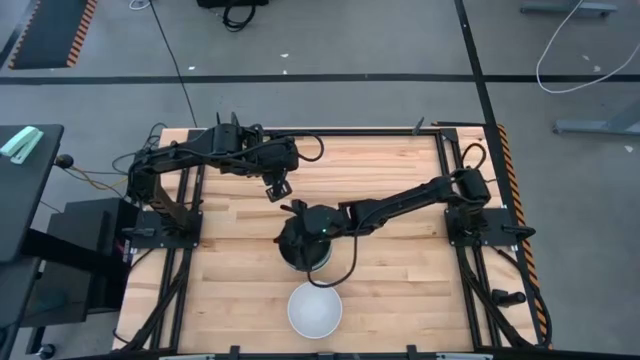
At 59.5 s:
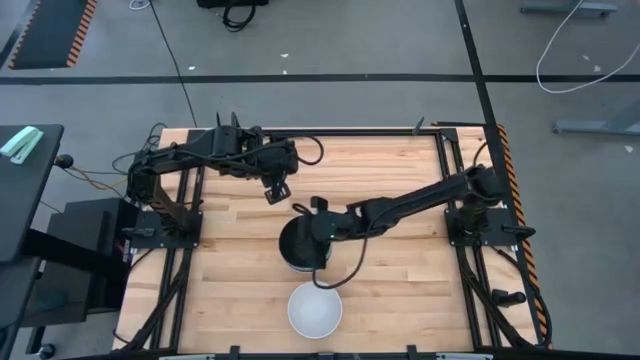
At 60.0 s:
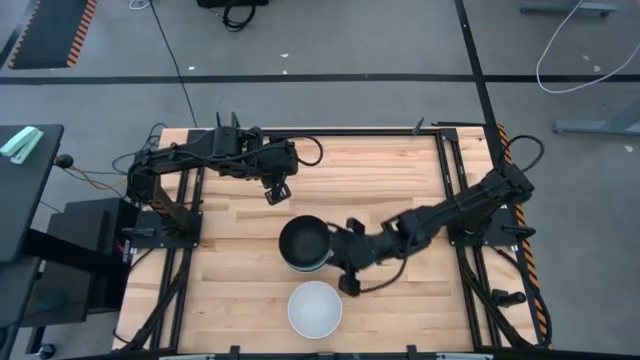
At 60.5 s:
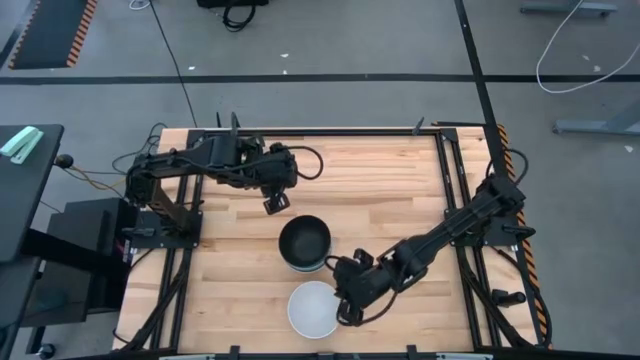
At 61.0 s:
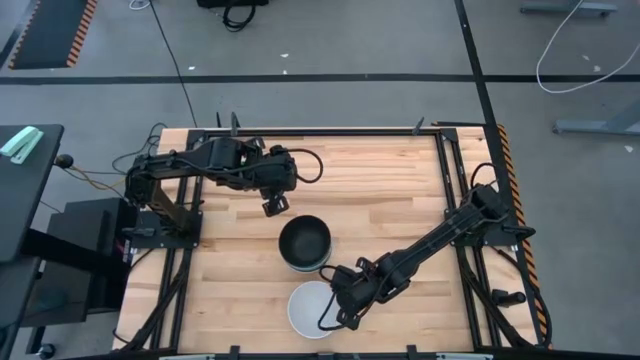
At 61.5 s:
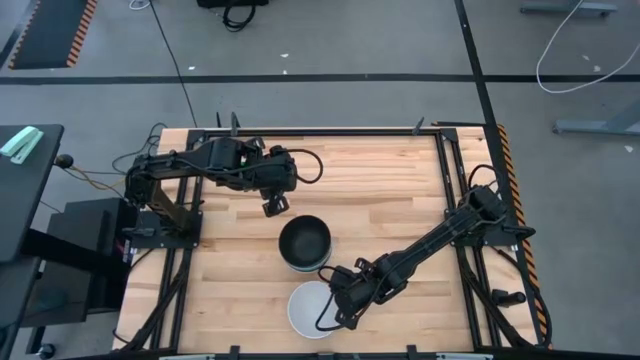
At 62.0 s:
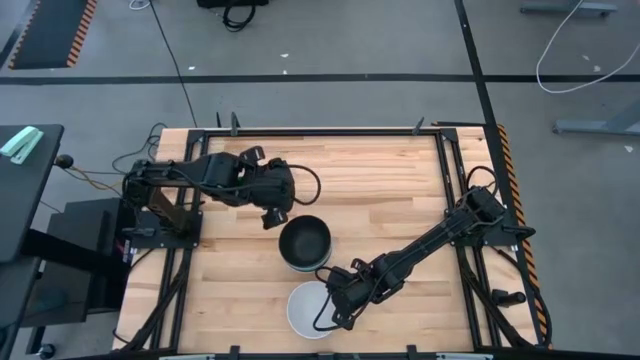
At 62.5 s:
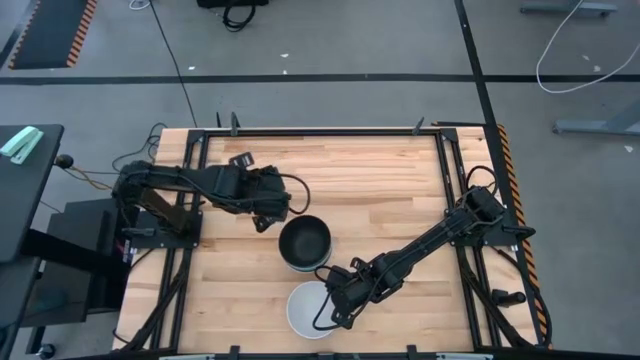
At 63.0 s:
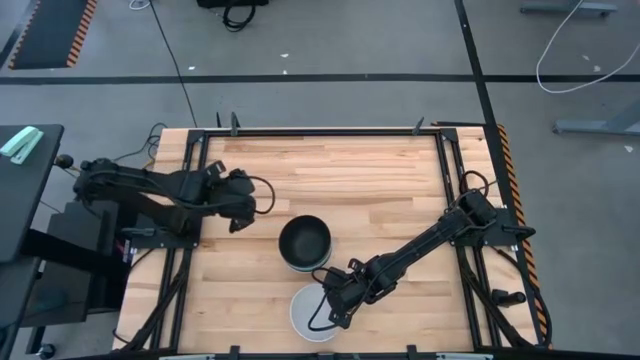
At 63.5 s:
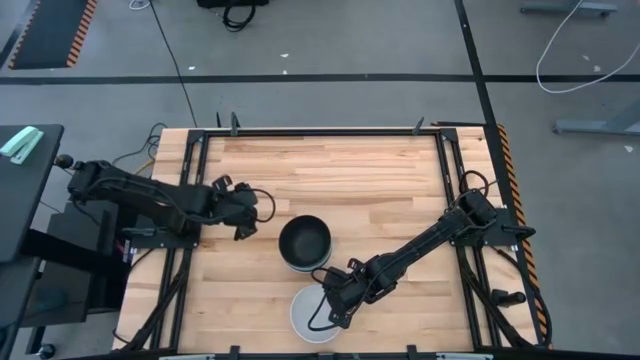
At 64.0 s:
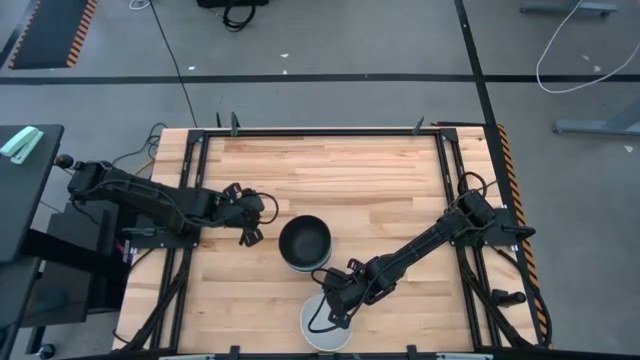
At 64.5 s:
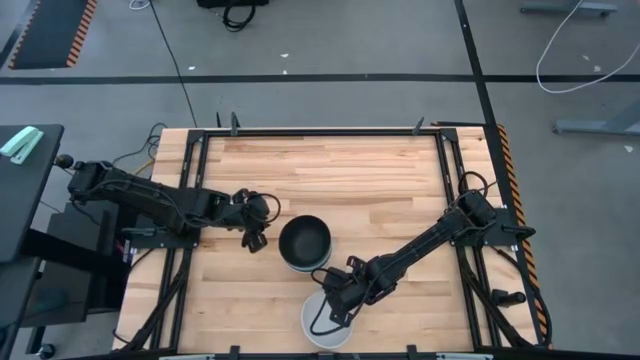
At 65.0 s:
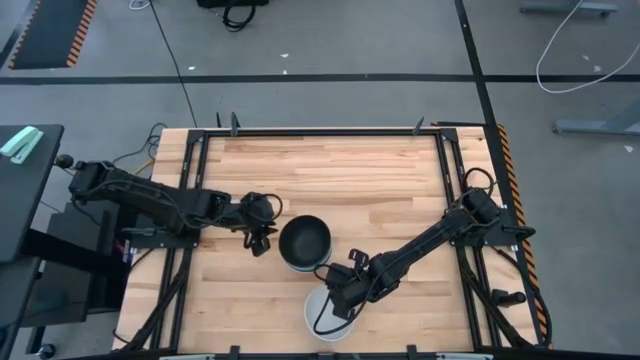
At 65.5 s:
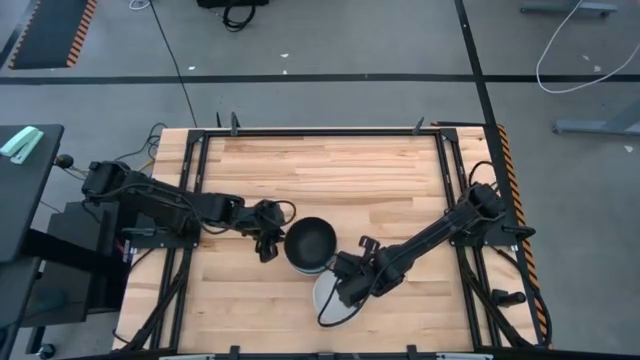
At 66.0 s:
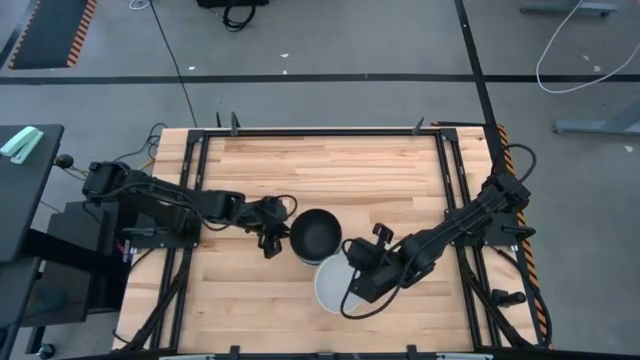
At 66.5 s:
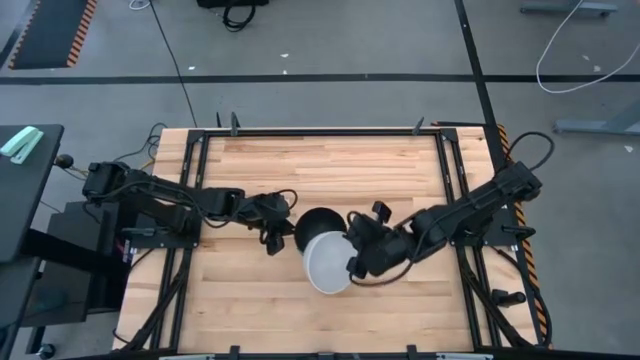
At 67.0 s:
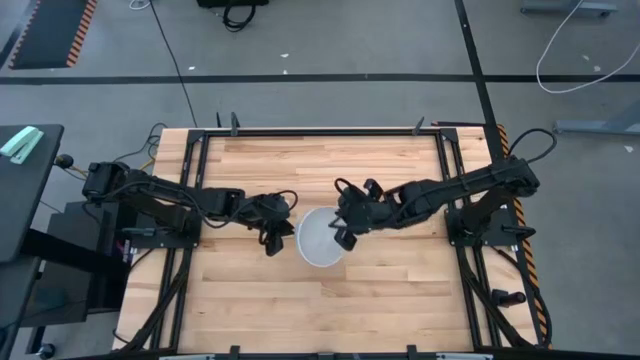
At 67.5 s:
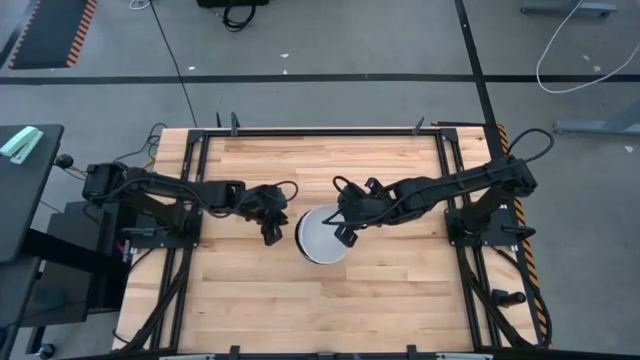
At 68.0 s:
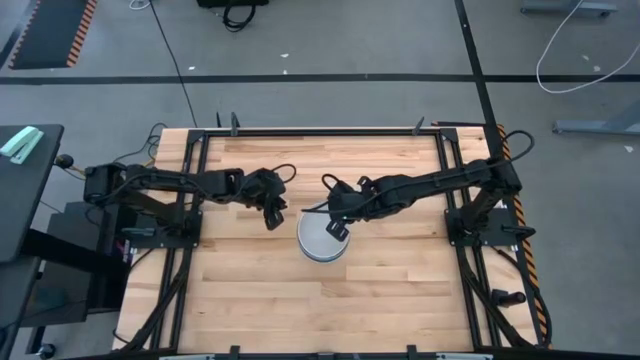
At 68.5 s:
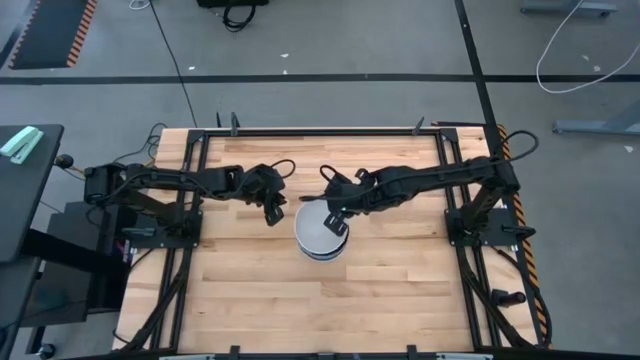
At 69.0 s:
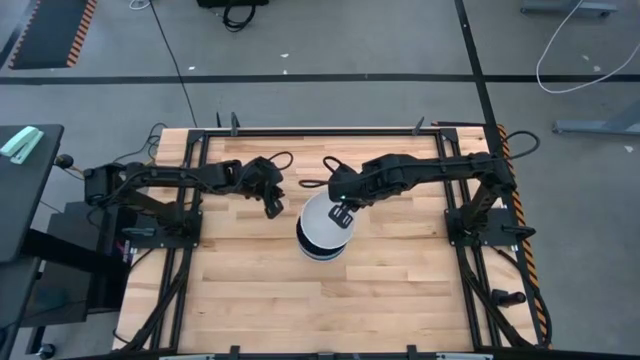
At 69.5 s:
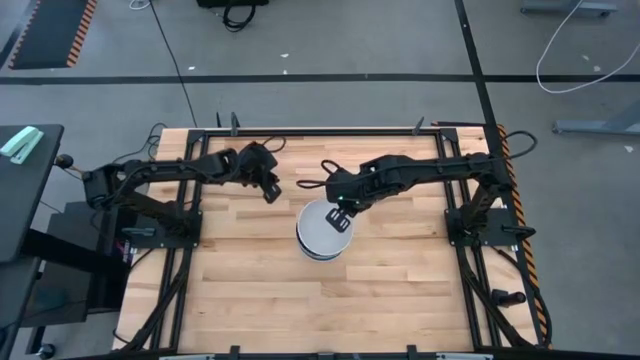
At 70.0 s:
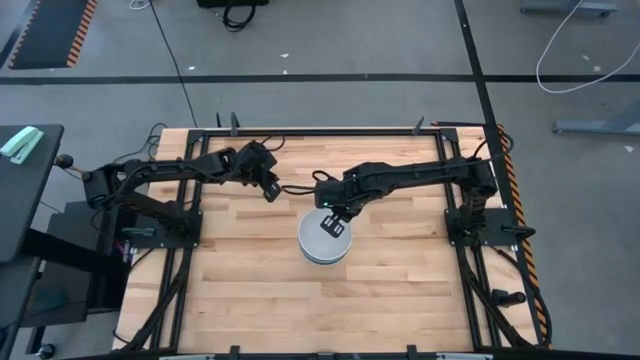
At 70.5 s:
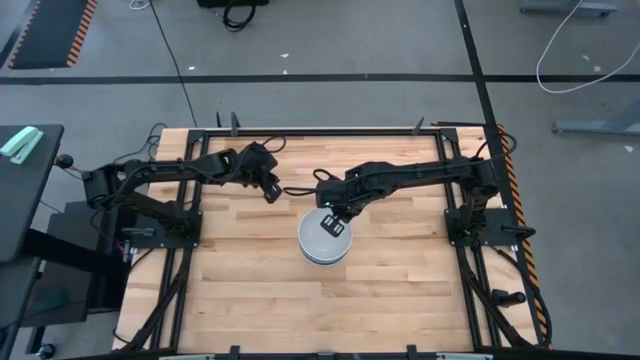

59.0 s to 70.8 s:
Task: Nest bowls inside each other
Stack the white bowl on top of the black bowl

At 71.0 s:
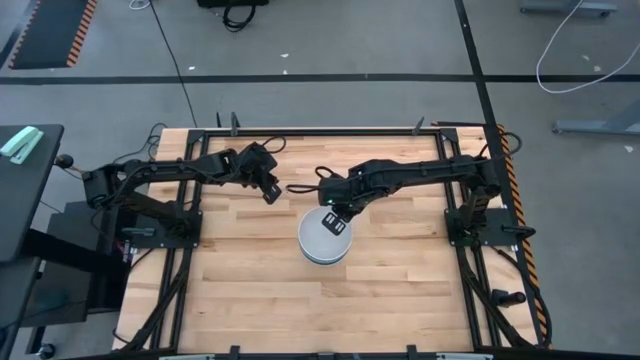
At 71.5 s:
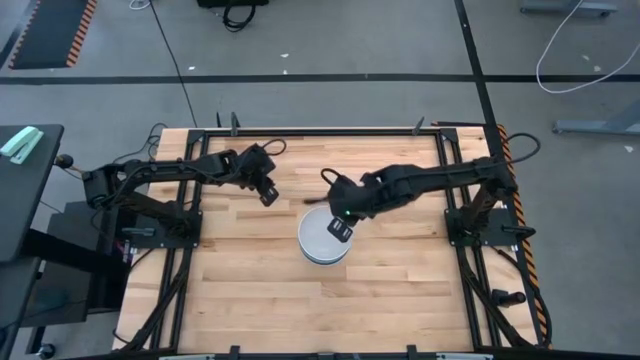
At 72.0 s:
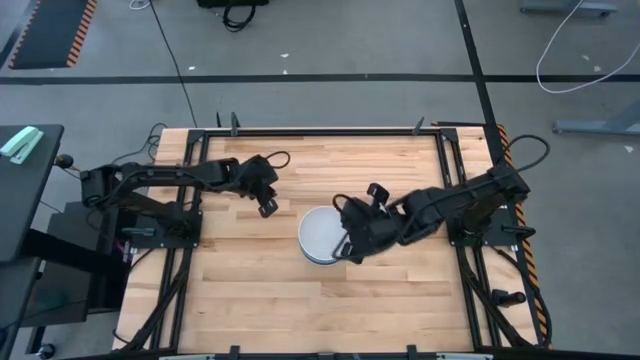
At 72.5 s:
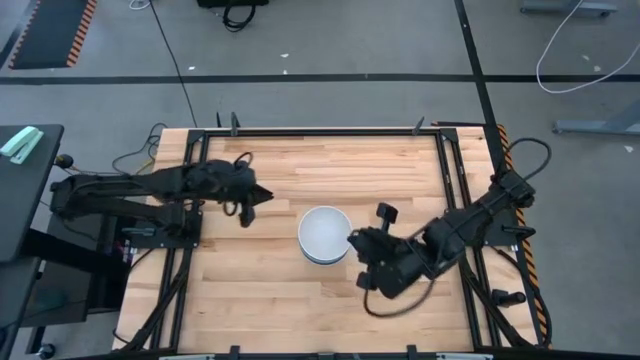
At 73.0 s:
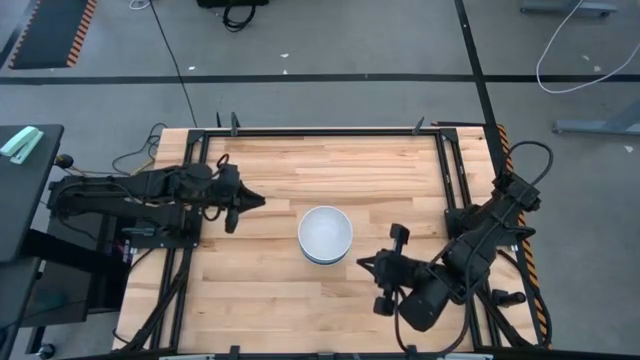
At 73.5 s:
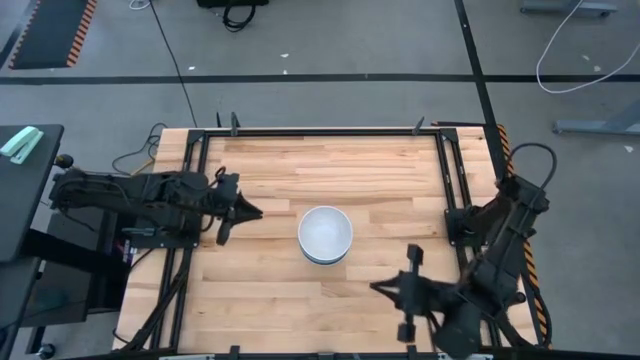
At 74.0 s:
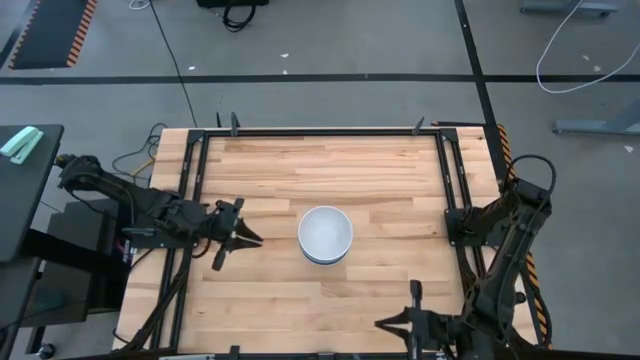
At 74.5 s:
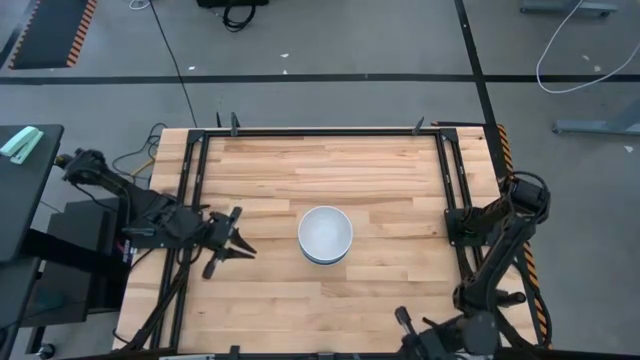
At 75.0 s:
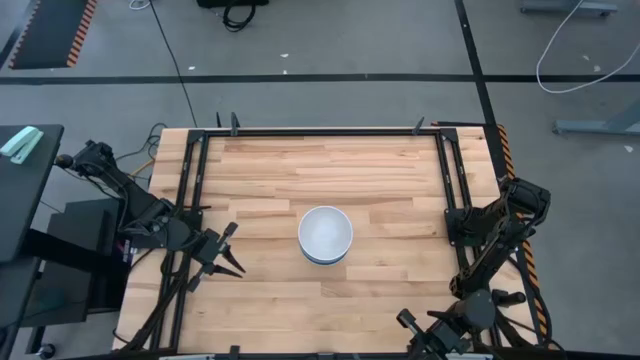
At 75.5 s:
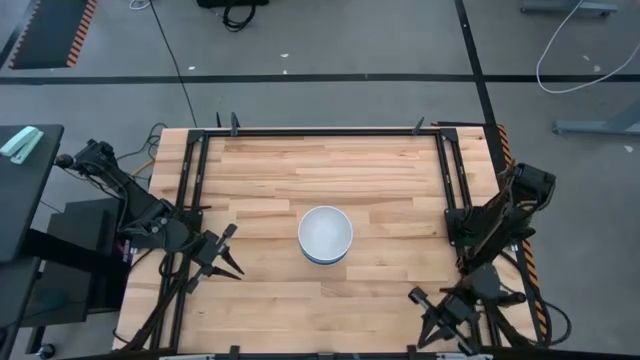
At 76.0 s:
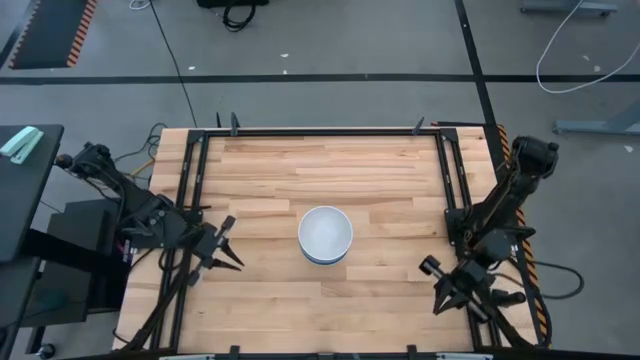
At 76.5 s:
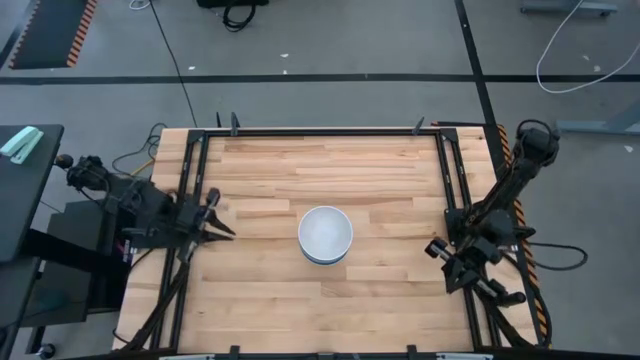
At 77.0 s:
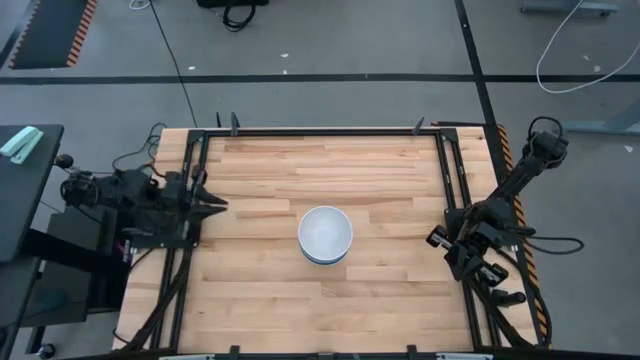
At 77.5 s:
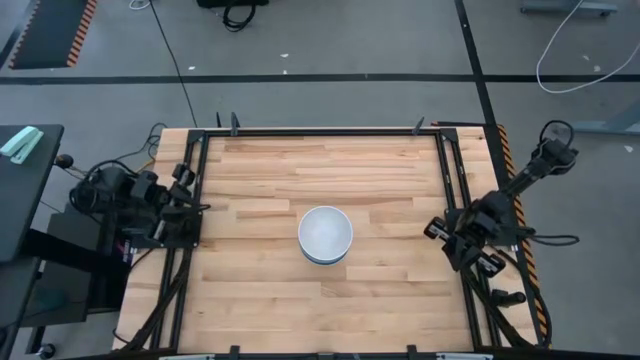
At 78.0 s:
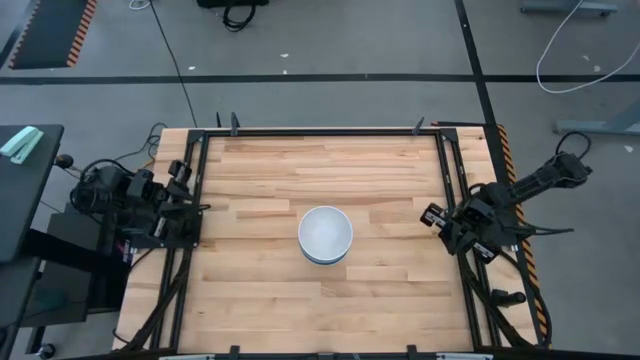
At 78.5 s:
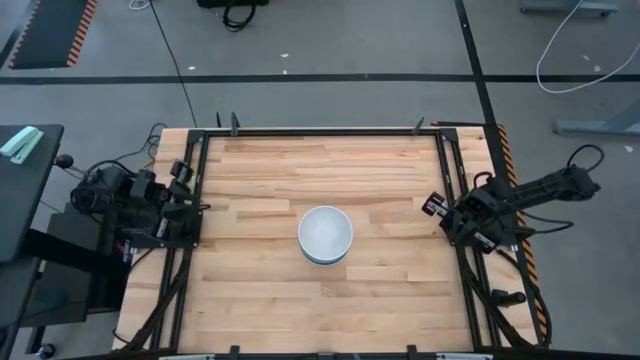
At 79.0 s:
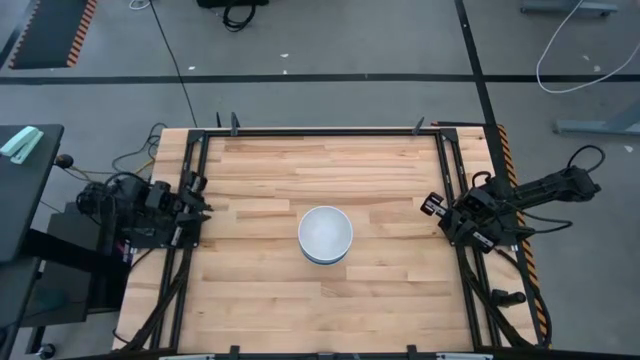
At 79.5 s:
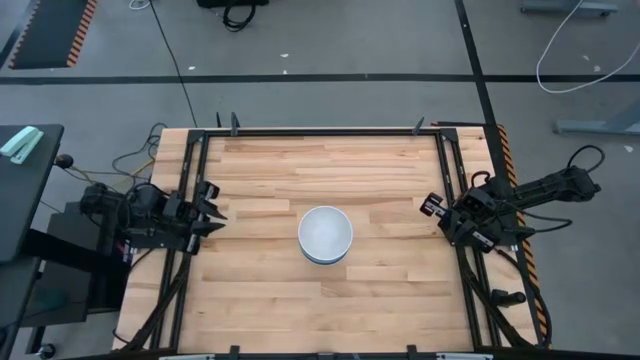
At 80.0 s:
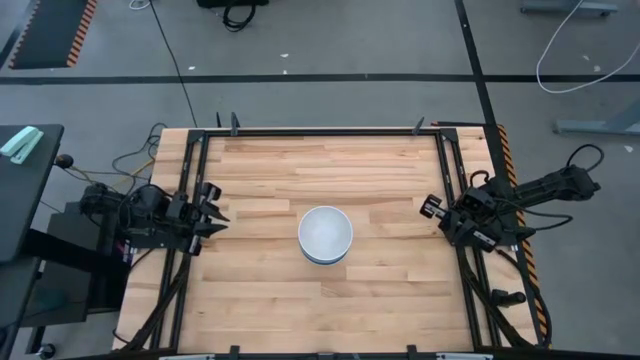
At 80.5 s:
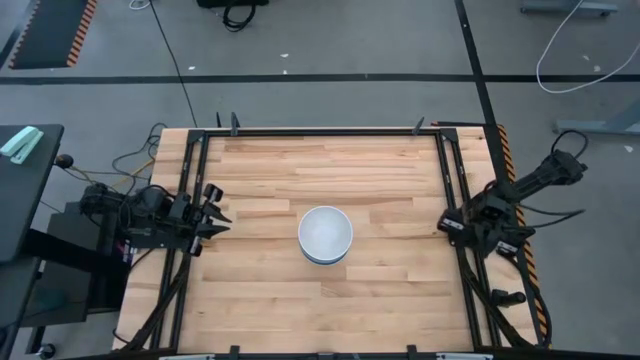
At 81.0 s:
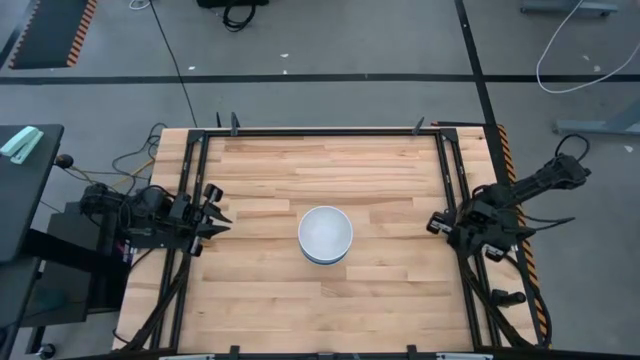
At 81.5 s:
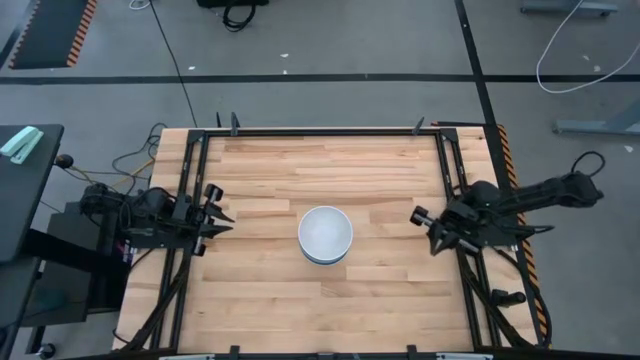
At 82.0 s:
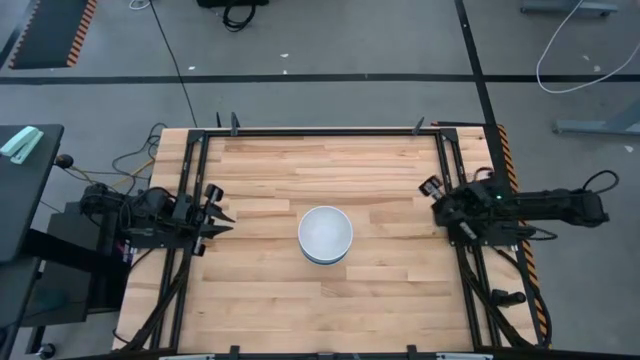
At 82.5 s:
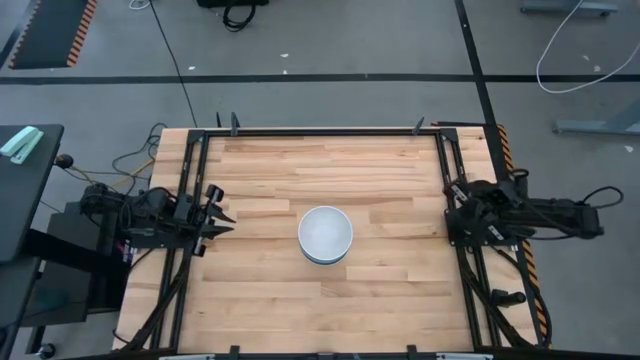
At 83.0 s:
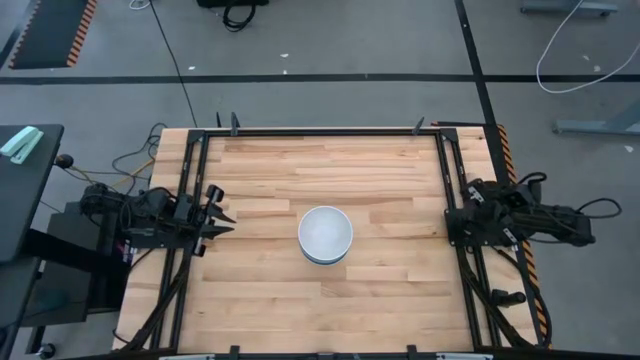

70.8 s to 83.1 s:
Return to Home Position
